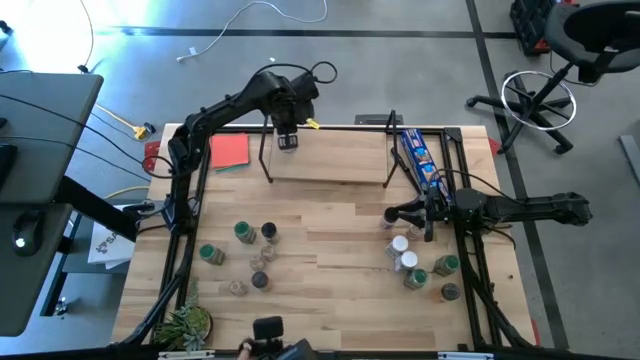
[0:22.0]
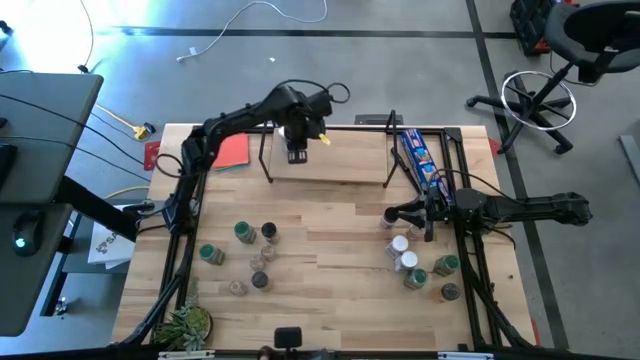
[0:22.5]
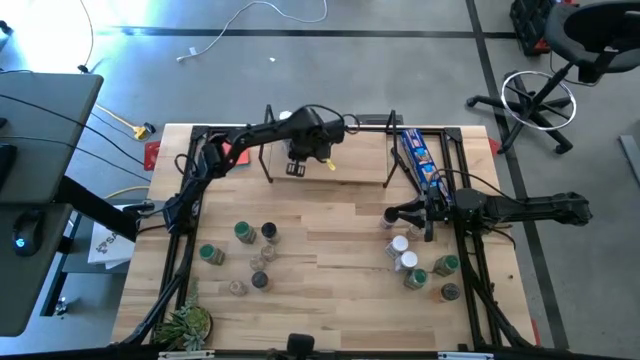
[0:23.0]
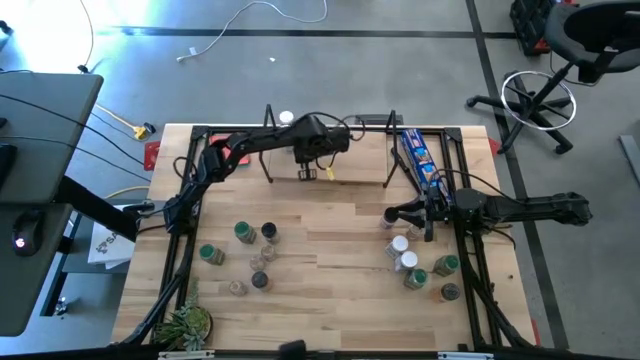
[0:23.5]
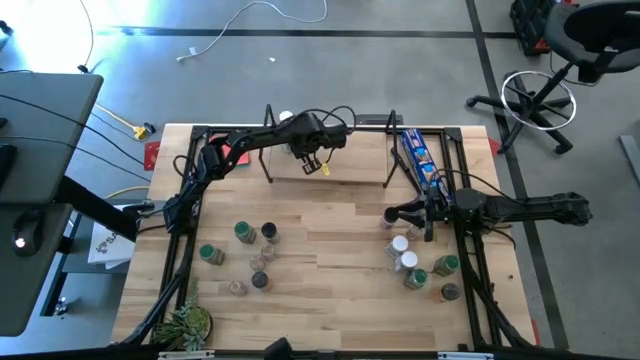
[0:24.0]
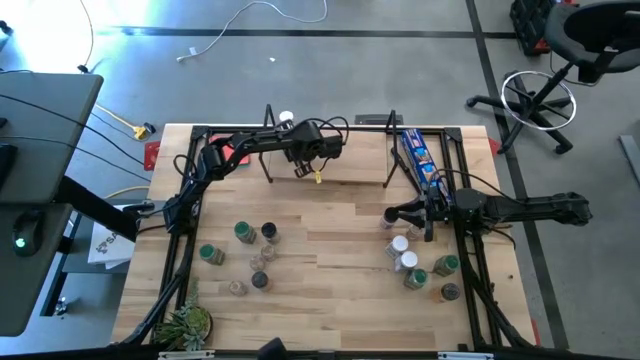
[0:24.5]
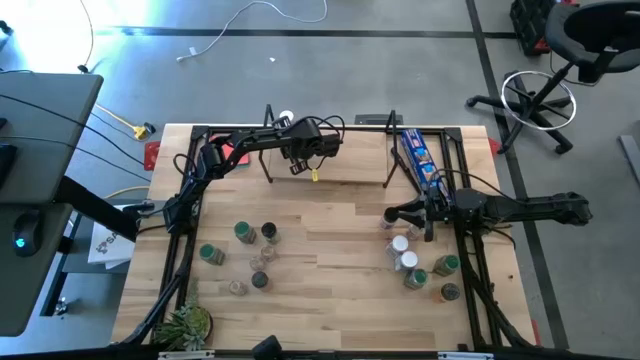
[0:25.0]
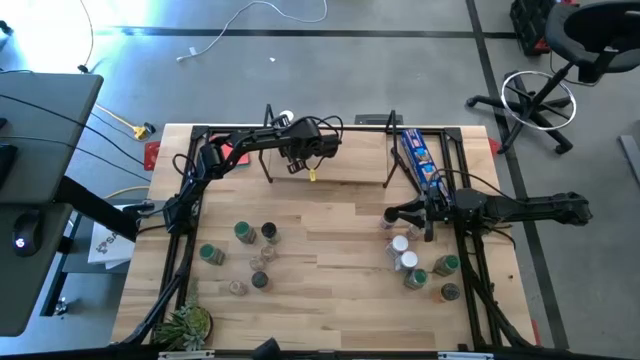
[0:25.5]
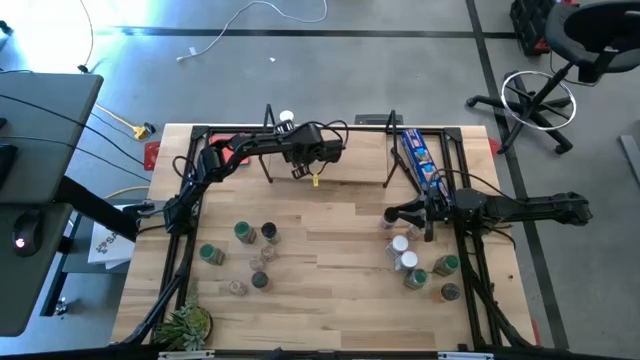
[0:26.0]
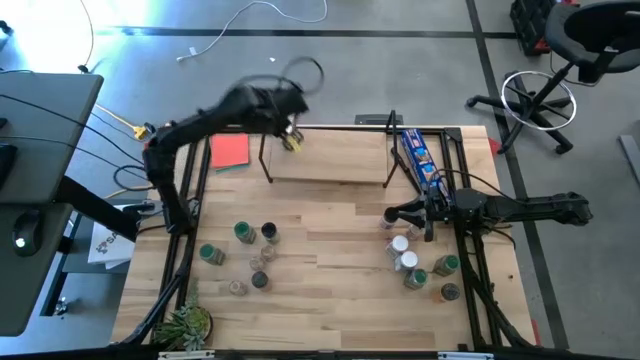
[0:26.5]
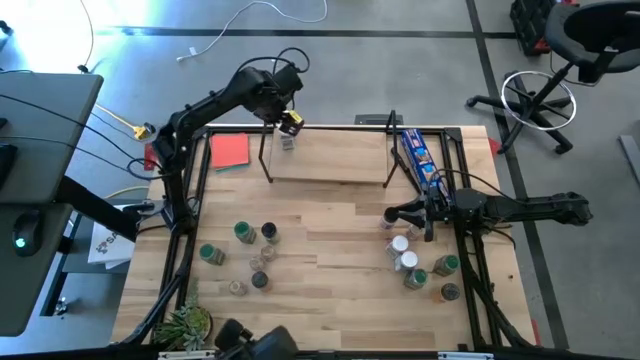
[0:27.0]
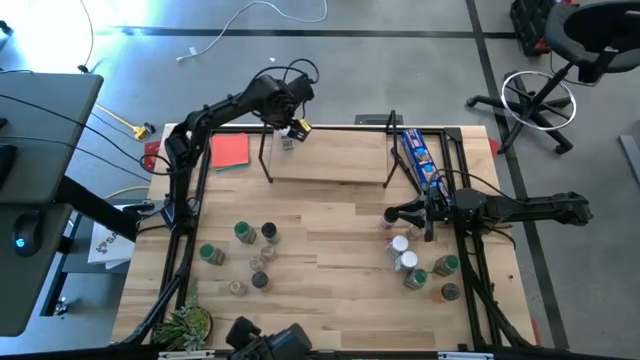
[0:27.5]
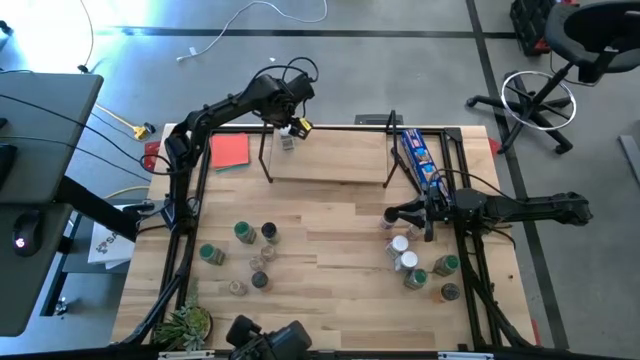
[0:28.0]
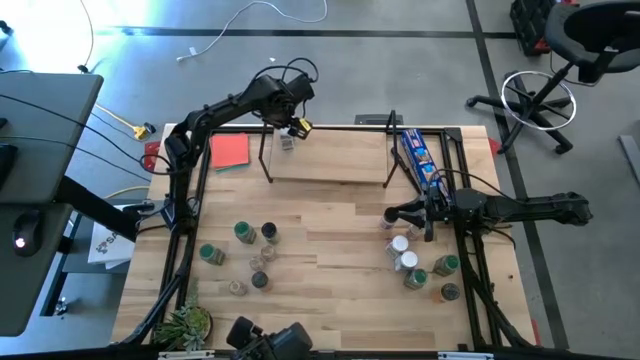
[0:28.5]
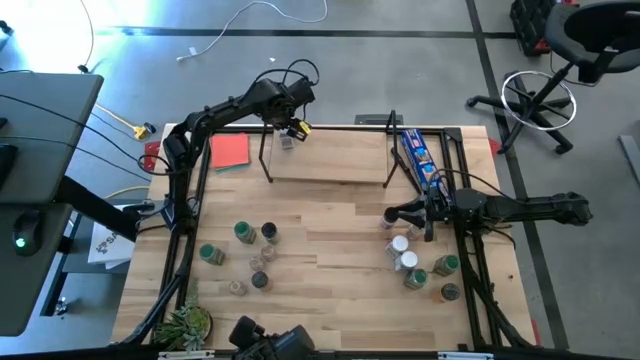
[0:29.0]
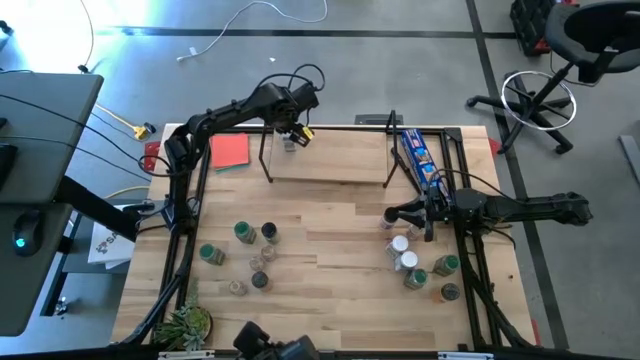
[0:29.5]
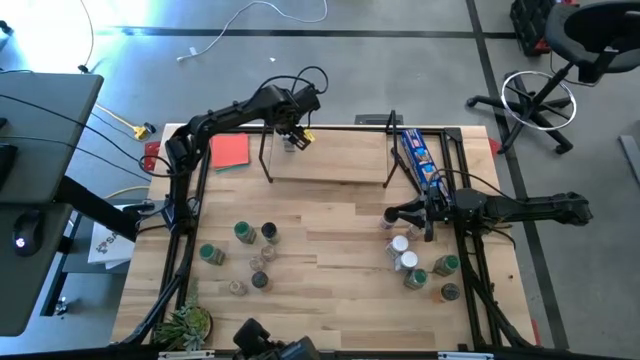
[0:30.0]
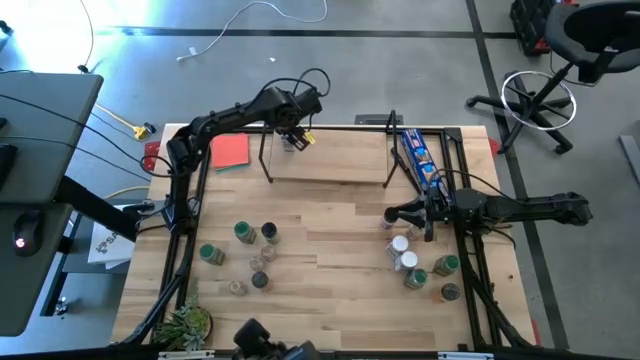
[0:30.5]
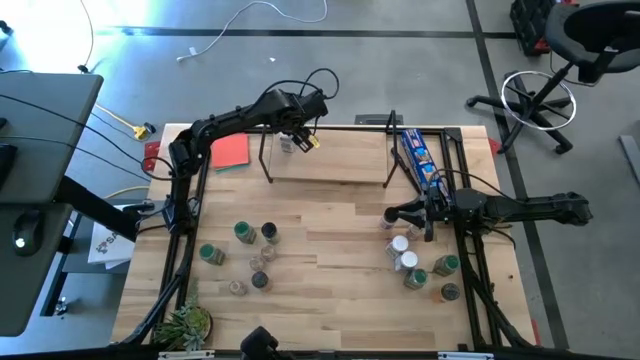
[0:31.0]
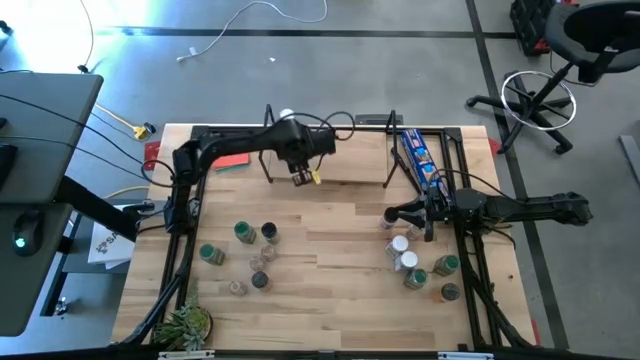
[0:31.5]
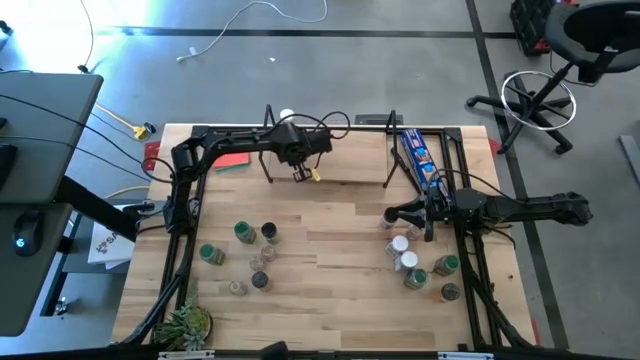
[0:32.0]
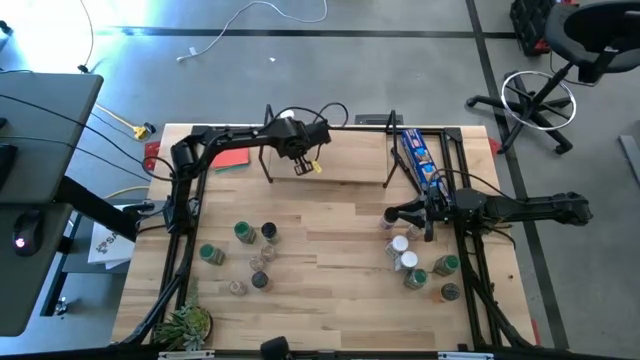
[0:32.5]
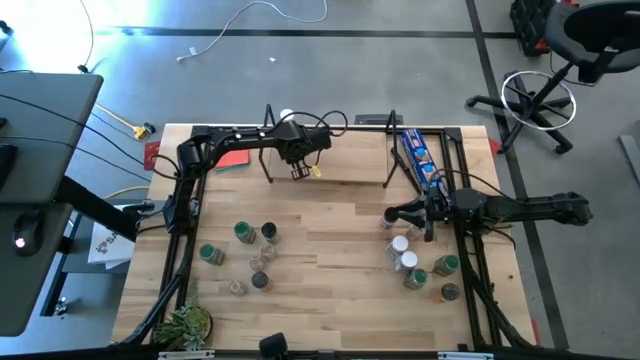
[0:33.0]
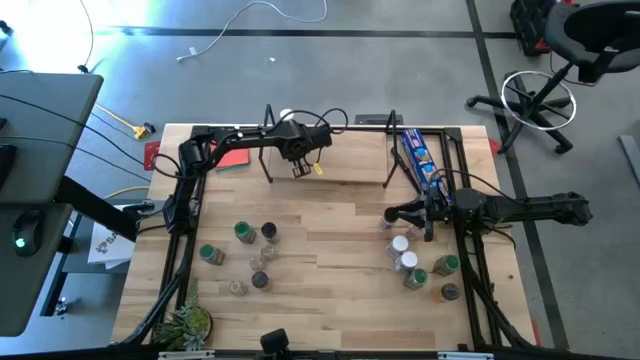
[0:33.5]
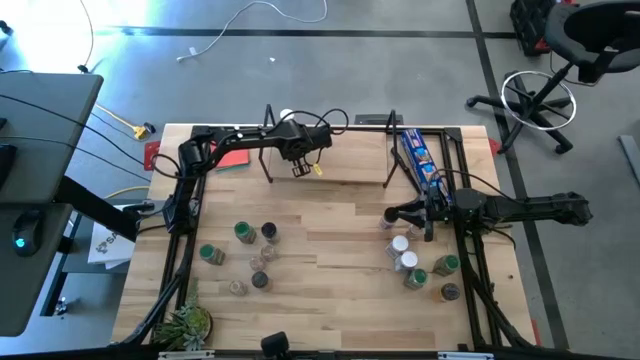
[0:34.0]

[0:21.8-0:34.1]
Task: Shelf spices
Put the white seasoning bottle on the shelf aligned with the other white seasoning bottle

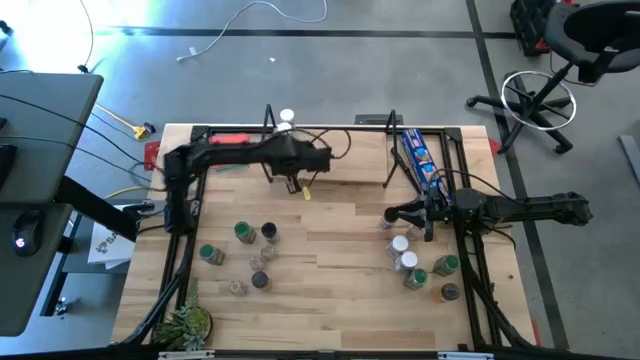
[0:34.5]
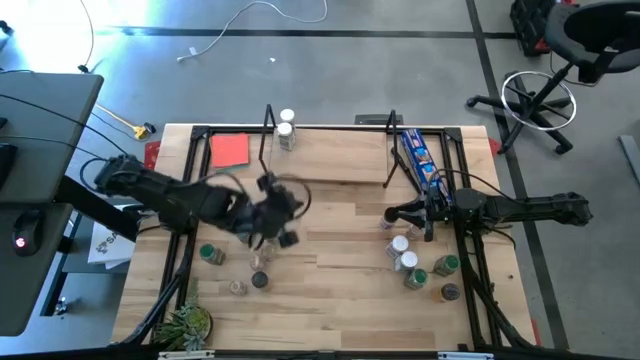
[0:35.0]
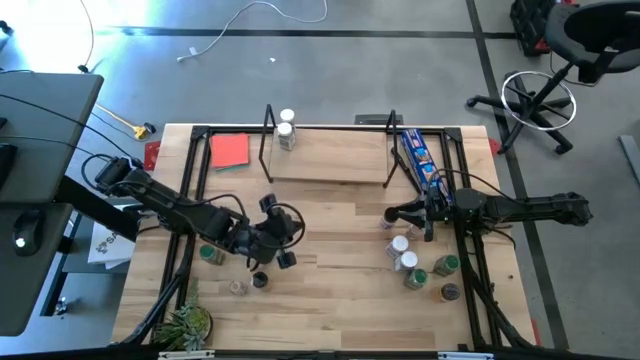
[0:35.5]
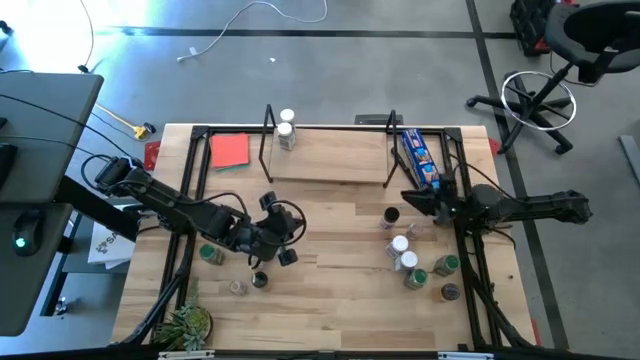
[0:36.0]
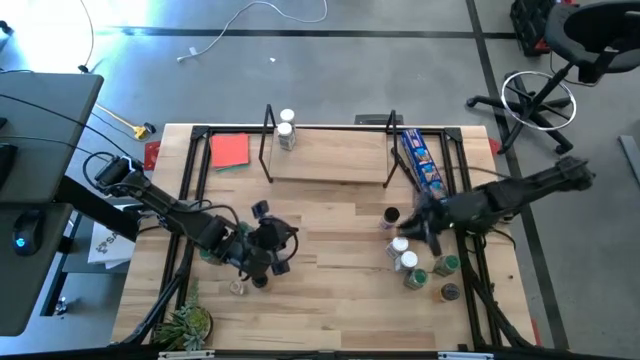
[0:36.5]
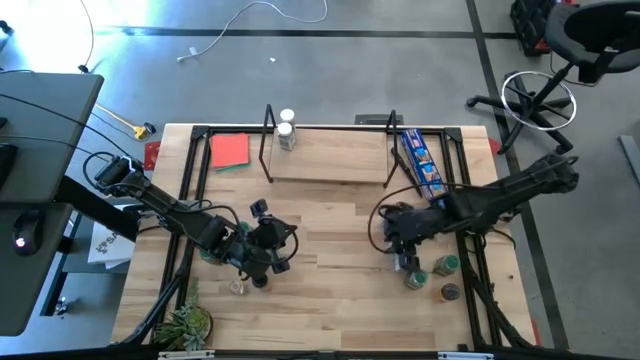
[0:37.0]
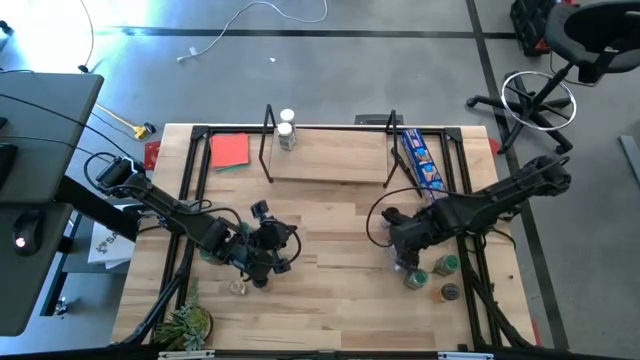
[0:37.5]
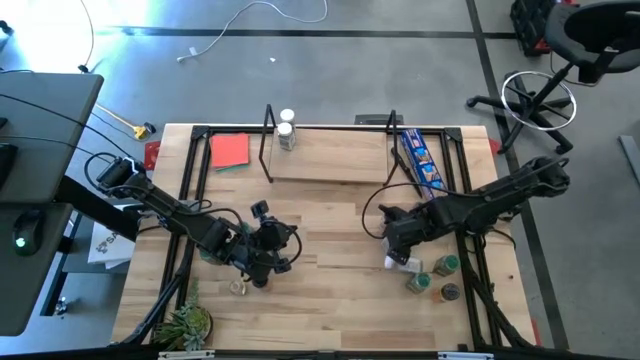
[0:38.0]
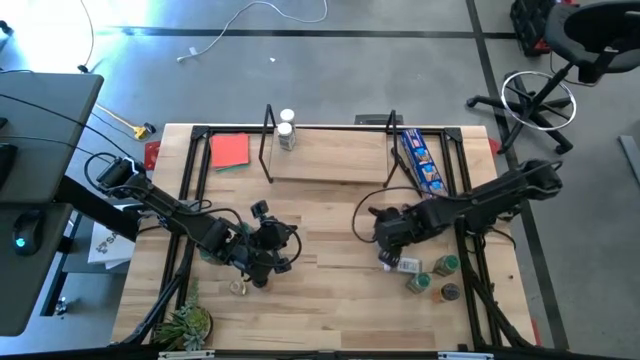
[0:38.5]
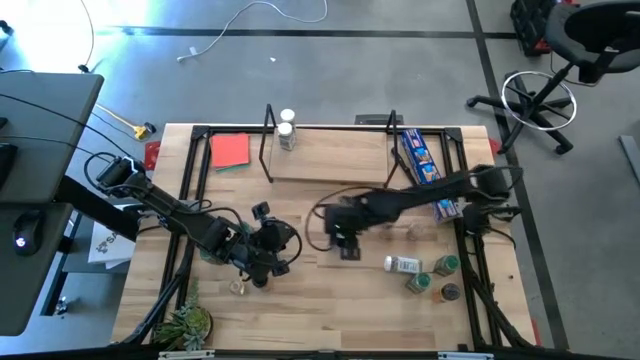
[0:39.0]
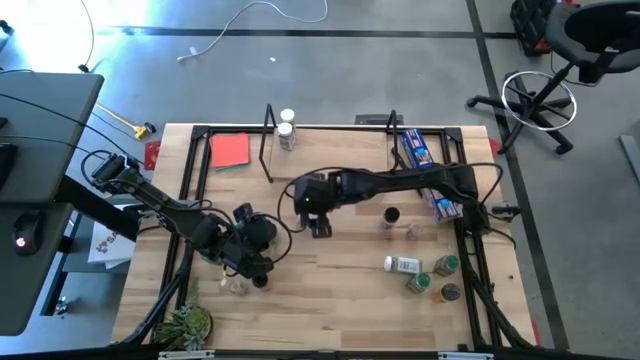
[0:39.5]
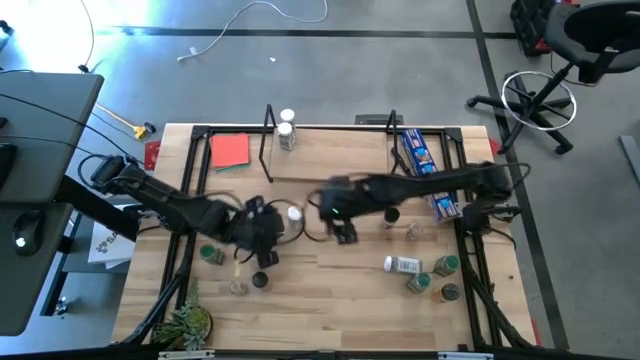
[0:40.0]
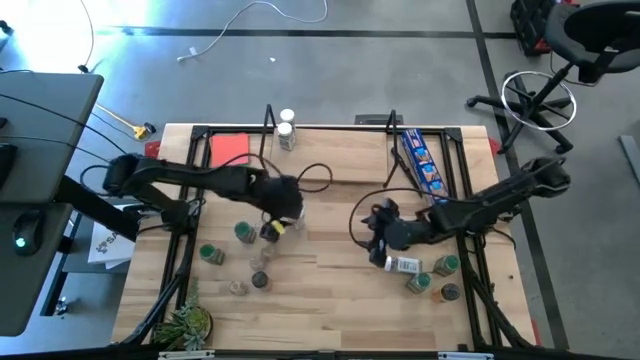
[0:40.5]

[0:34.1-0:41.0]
Put the white seasoning bottle on the shelf aligned with the other white seasoning bottles

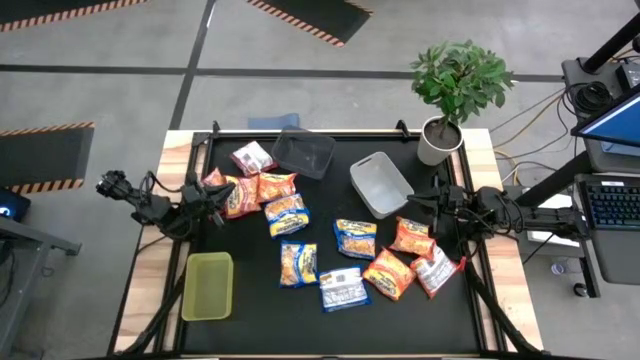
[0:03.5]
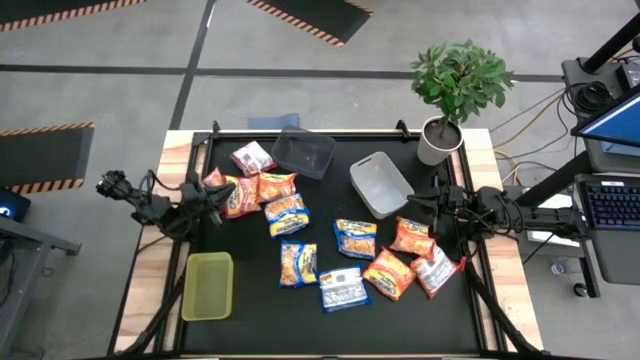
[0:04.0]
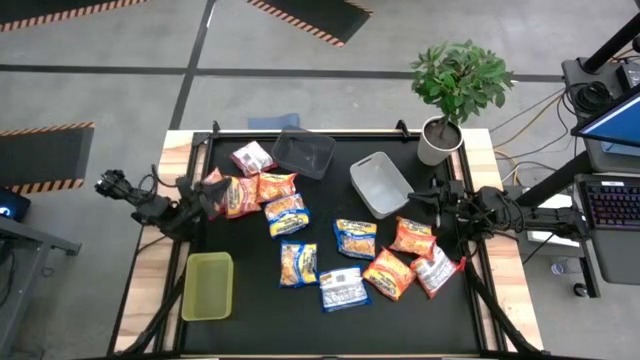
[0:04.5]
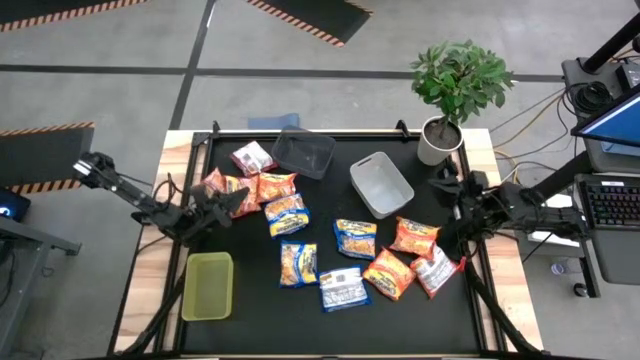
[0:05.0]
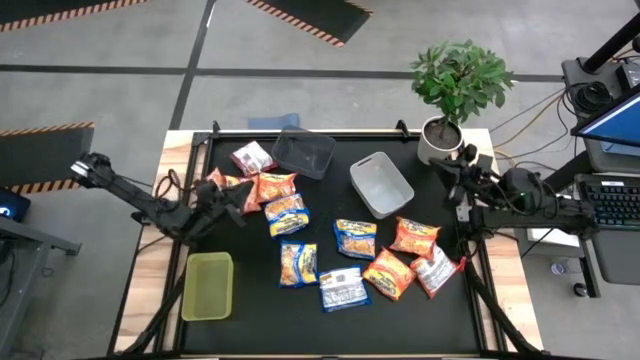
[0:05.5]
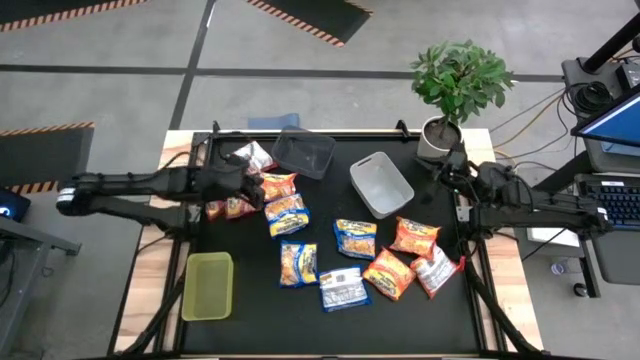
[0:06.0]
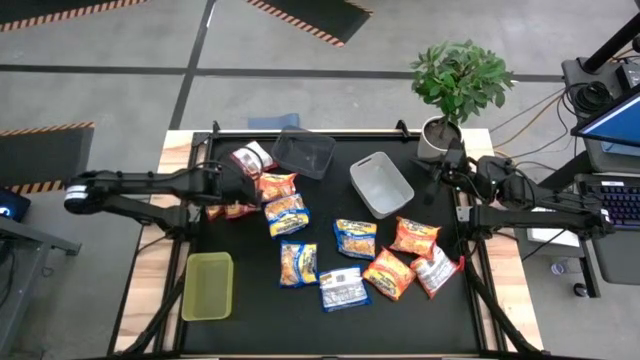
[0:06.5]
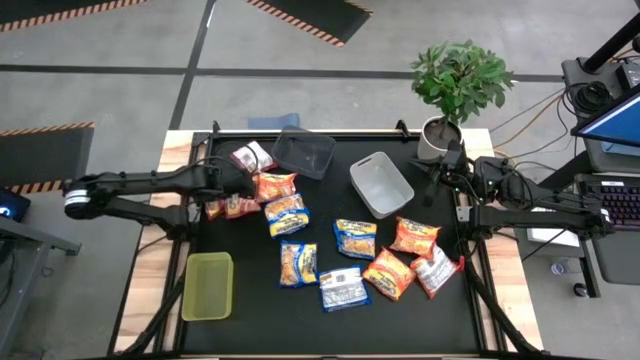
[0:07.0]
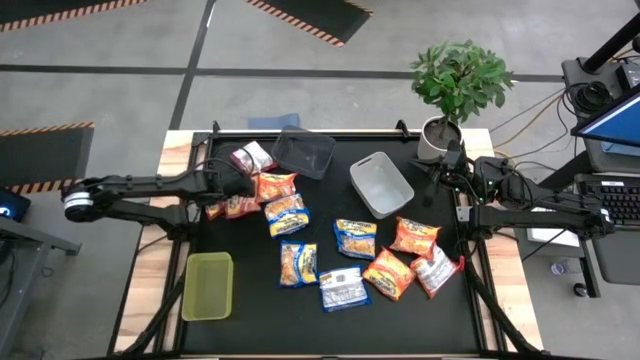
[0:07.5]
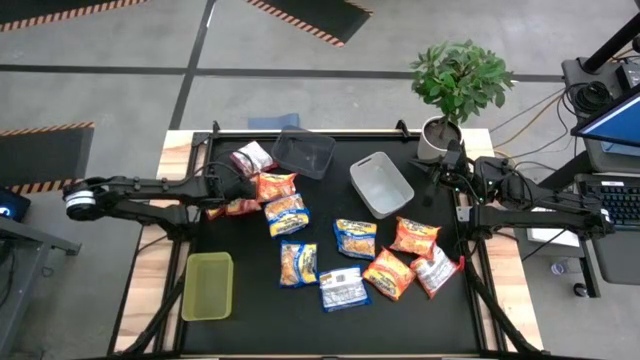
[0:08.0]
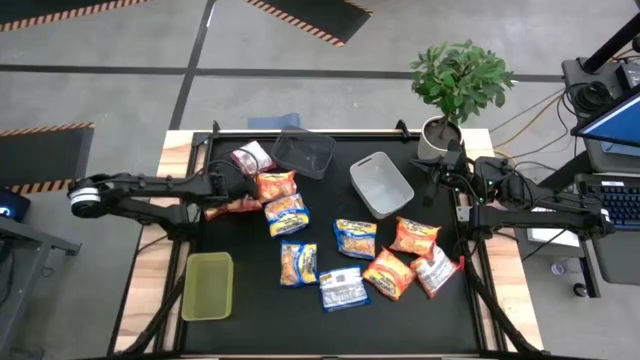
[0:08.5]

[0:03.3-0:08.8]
Task: Sort Maruchan noodles
Put the red noodle pack into the yellow bin
